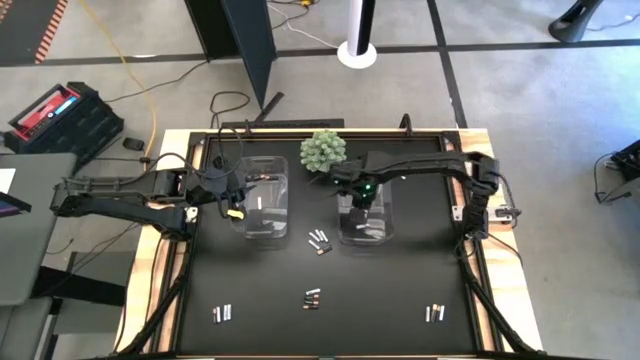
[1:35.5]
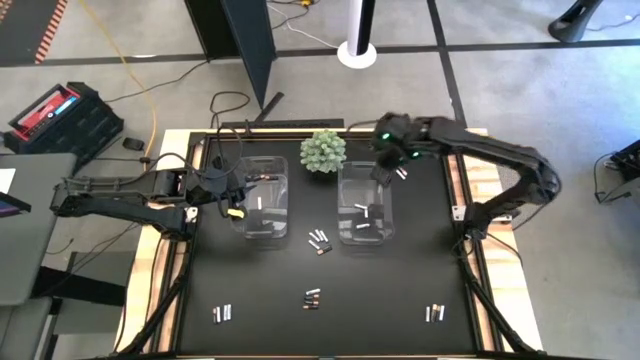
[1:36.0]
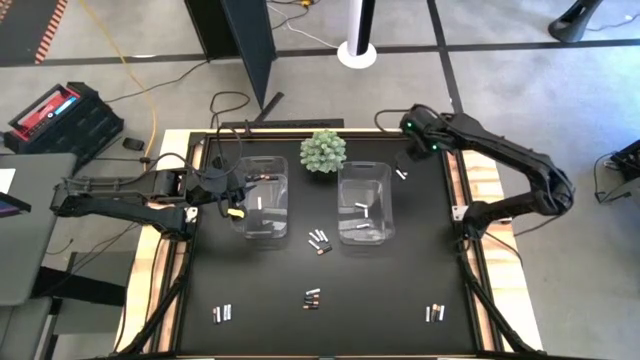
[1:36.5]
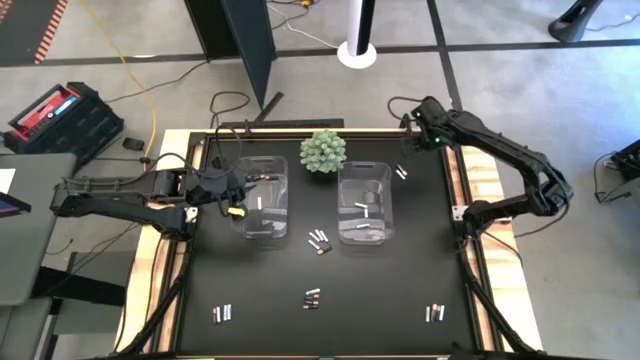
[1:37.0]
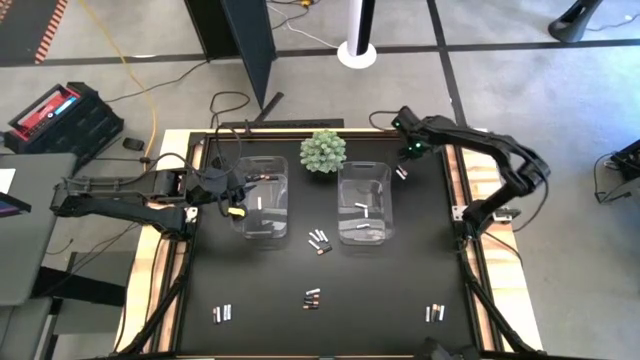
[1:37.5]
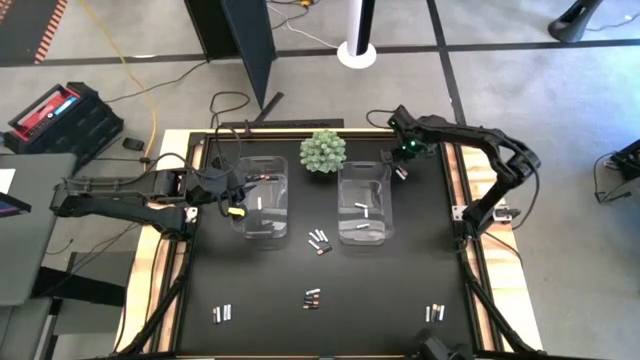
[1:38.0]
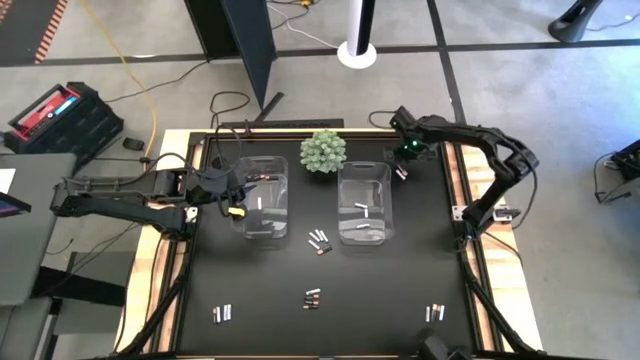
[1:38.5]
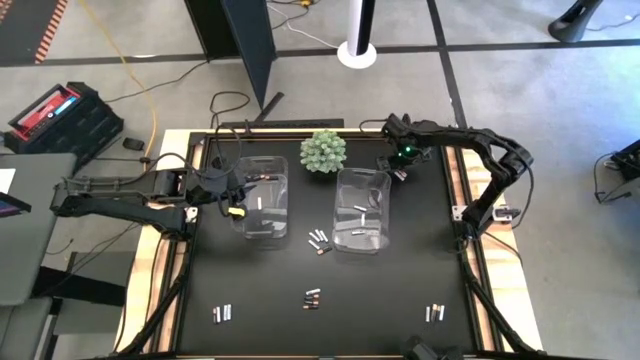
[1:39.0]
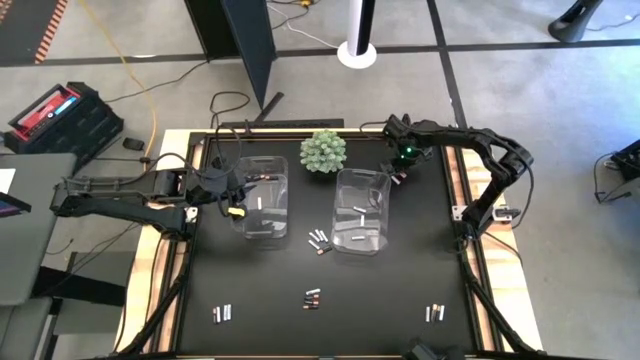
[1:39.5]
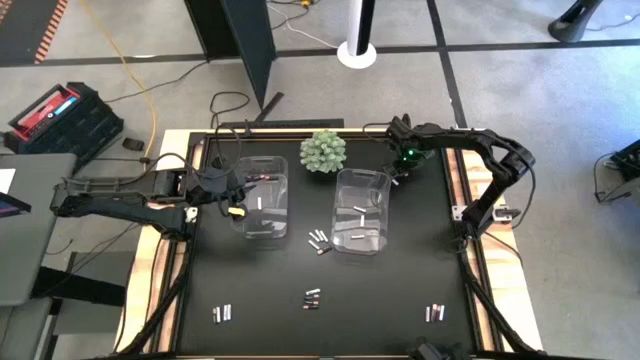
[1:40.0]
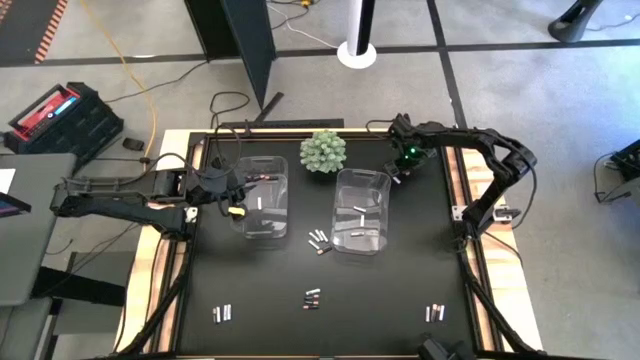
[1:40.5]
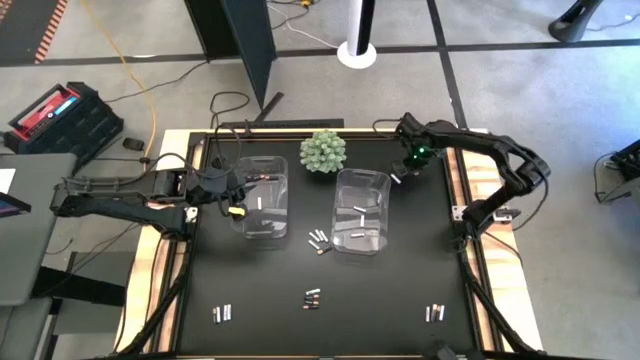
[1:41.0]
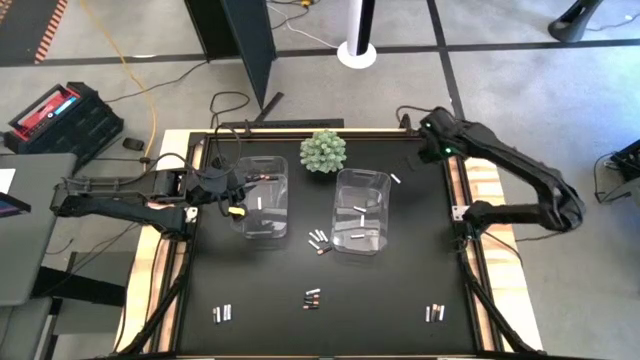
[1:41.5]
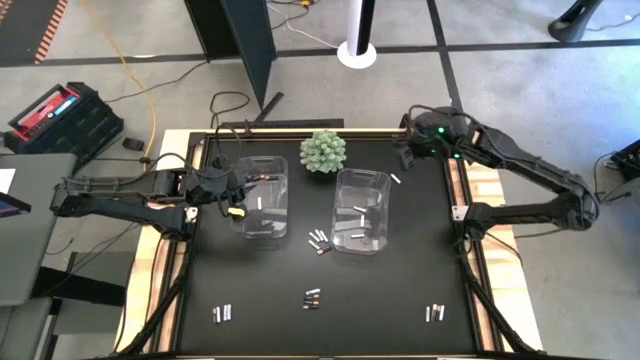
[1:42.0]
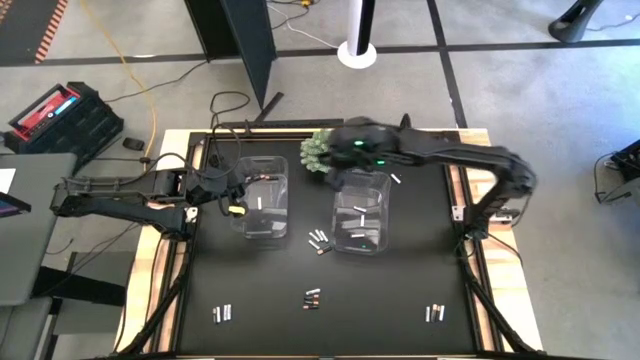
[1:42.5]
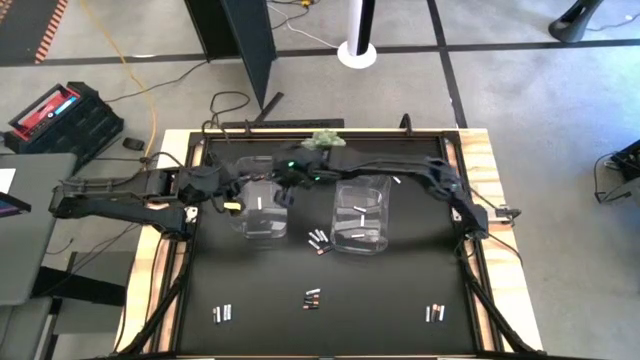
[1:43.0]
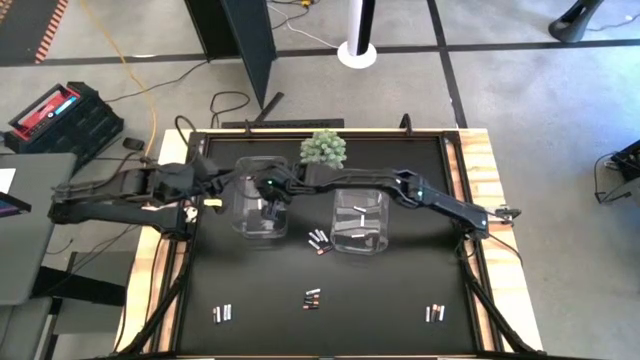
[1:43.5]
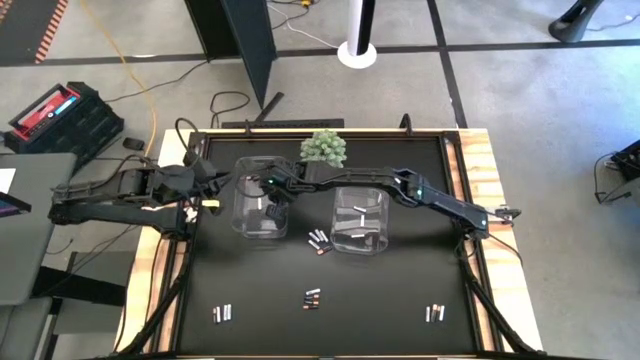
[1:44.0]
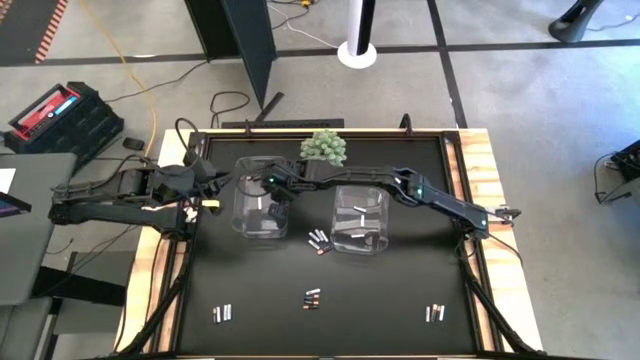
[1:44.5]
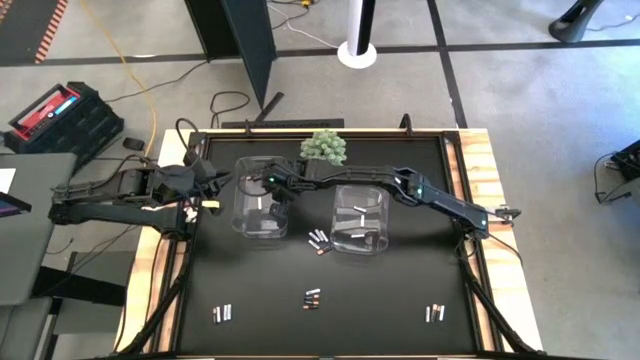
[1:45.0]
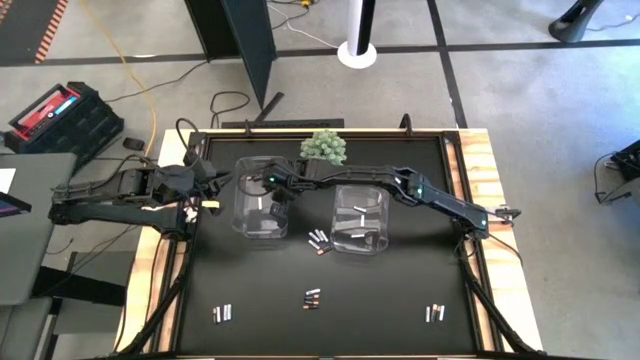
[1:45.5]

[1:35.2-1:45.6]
Task: Sort batteries
Put the black-brown battery into the left transparent bin

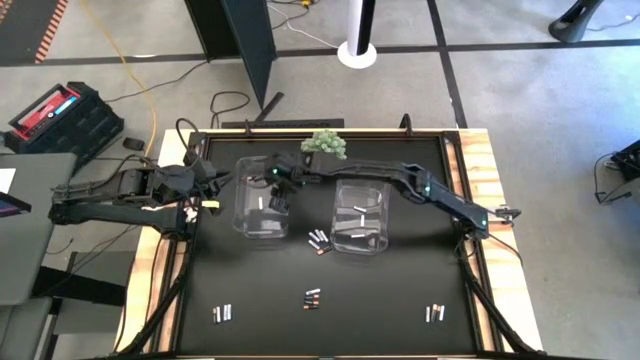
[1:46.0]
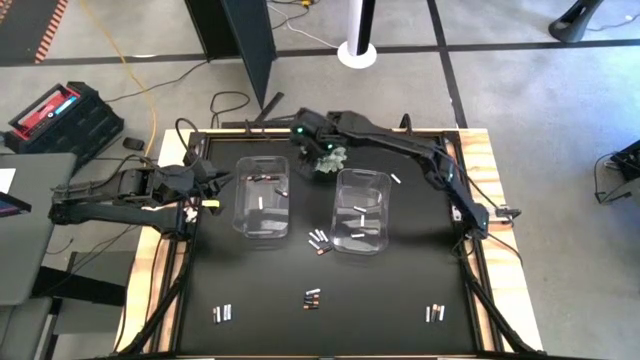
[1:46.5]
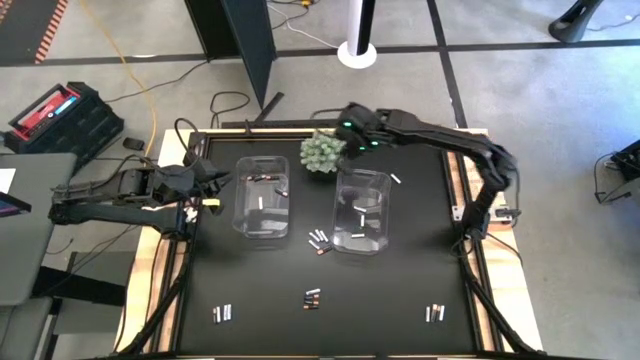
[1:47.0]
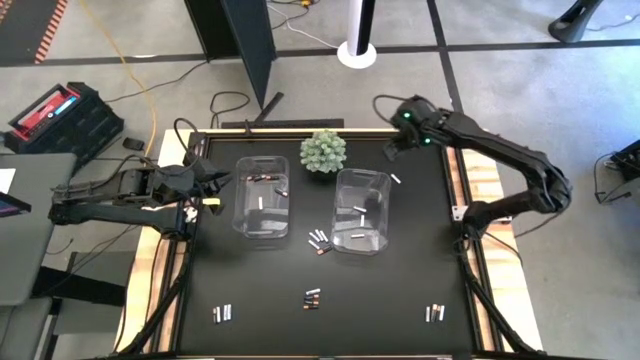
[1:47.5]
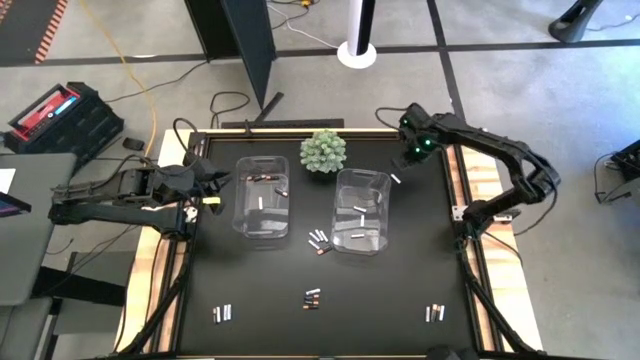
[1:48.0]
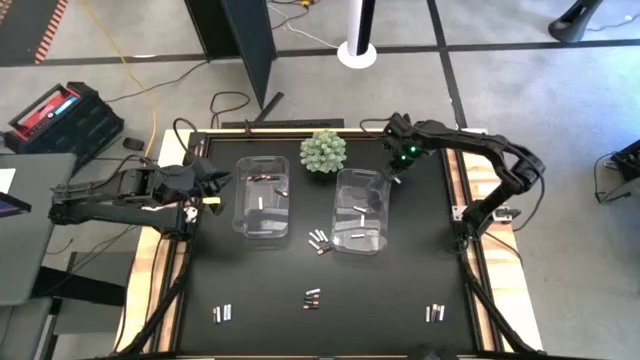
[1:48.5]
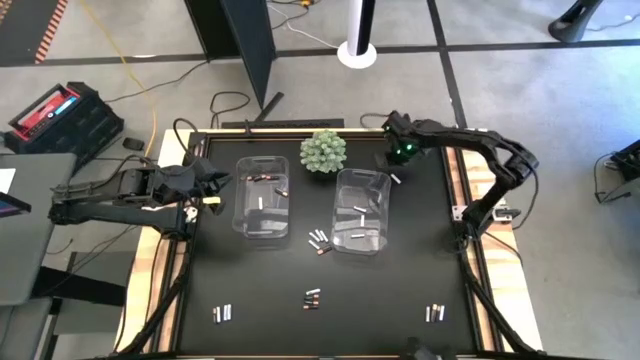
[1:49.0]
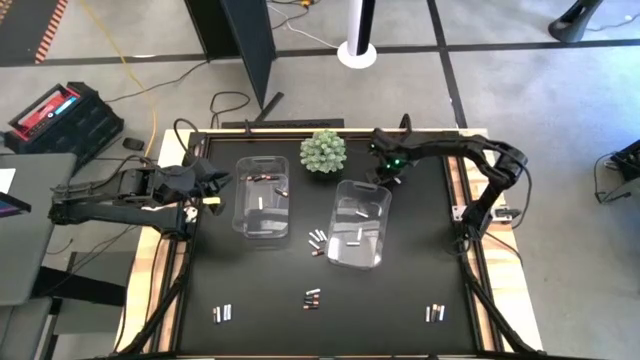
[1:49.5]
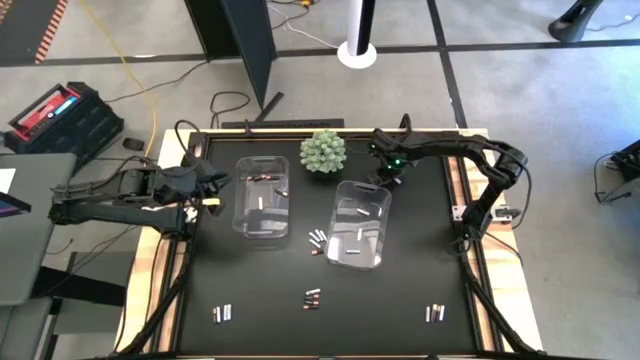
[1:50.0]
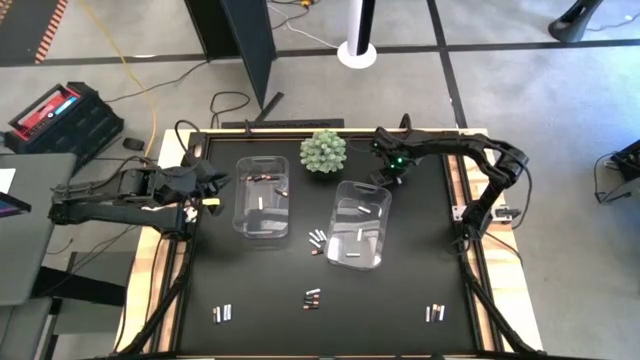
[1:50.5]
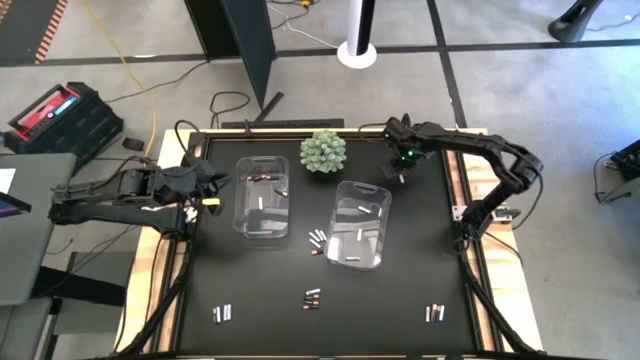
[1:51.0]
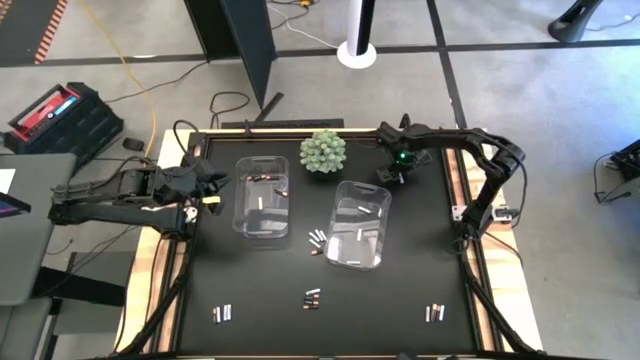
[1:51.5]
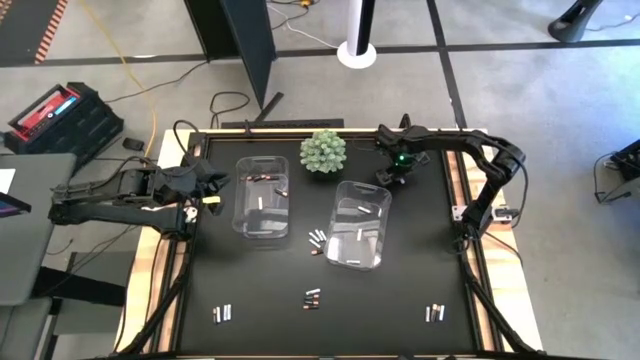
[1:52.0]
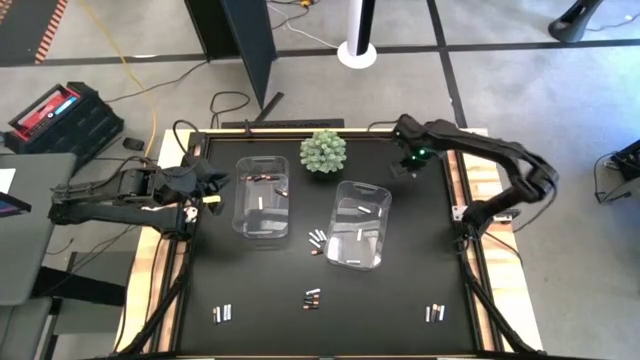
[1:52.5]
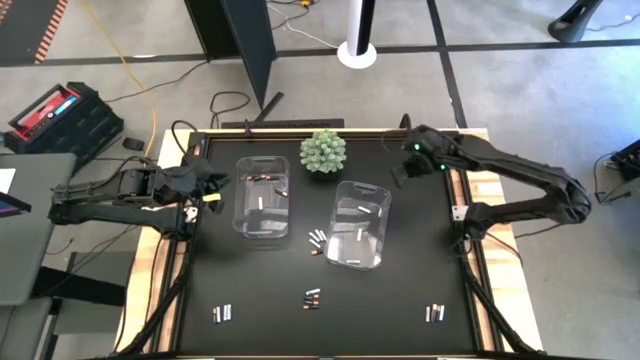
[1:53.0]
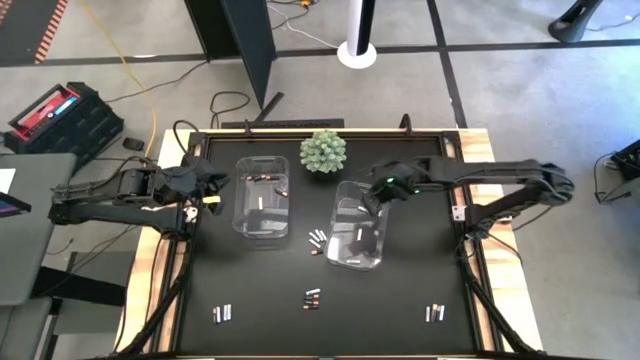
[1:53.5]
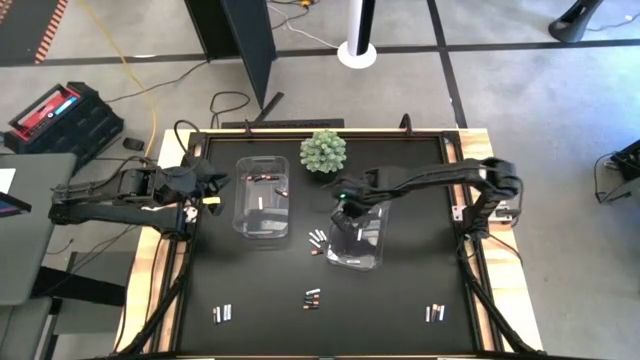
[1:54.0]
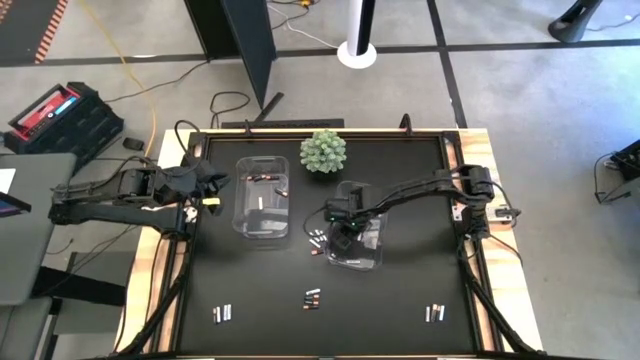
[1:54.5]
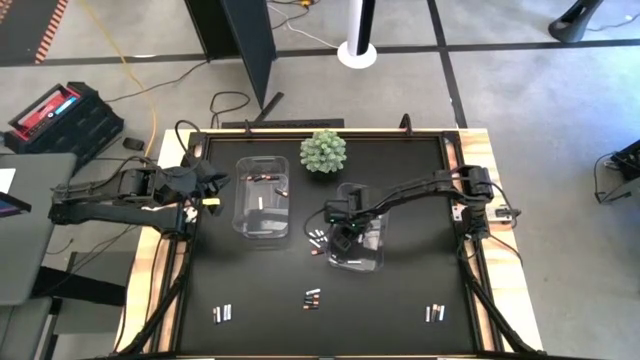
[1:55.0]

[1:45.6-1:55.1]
Put the white-blue battery into the right transparent bin

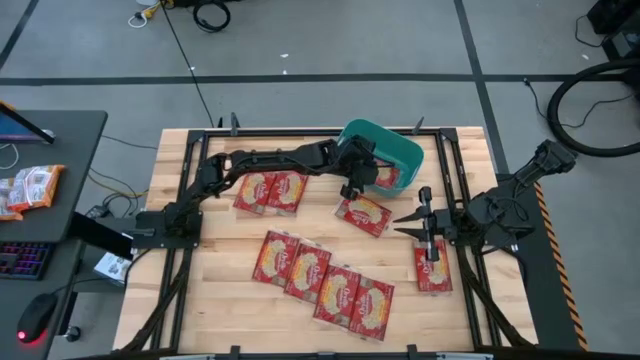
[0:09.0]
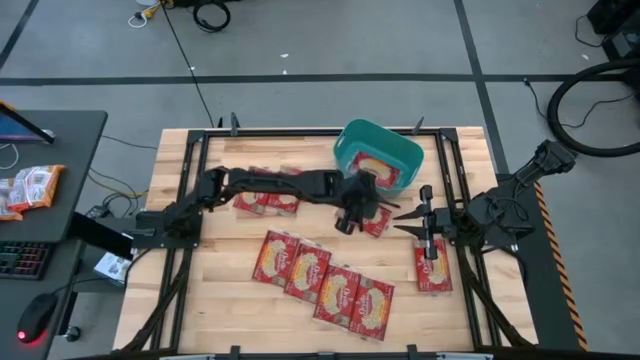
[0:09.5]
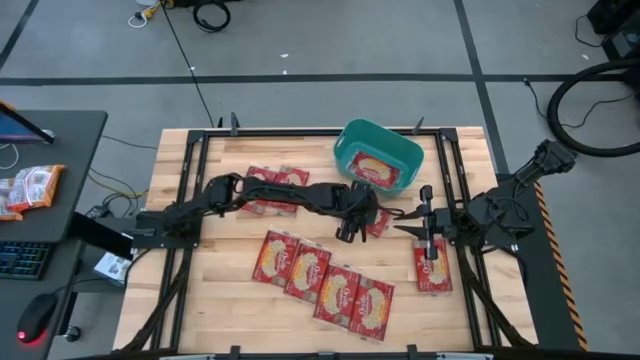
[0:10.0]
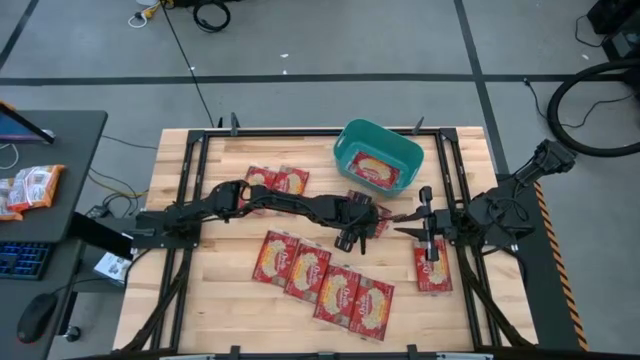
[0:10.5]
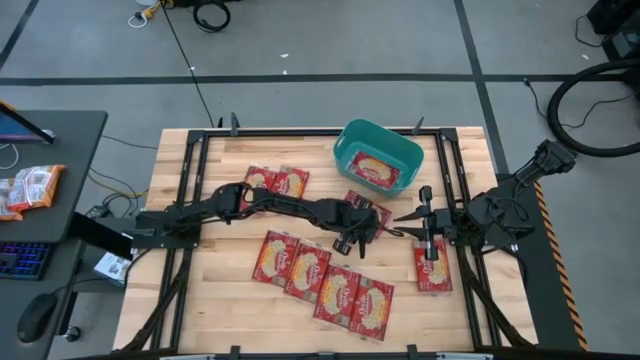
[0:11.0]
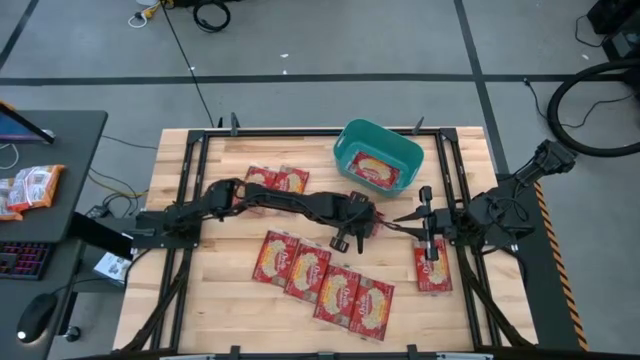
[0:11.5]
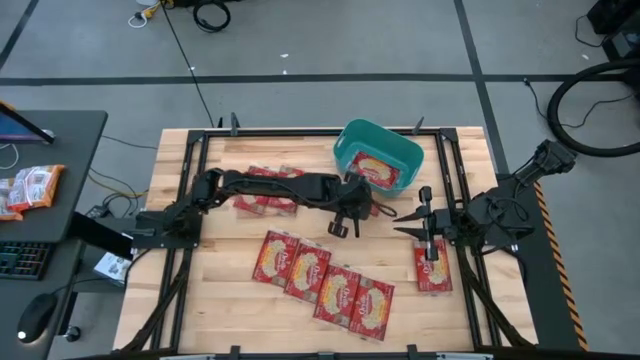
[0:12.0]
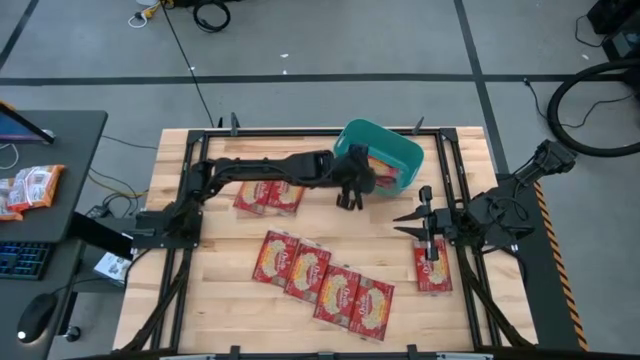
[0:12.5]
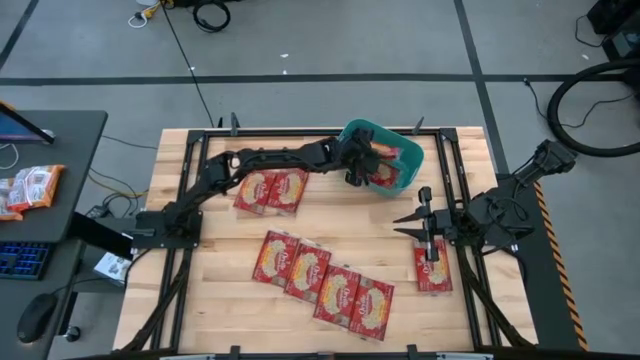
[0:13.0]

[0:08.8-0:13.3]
Task: Sort popcorn bags into baskets
Put the popcorn bag into the bin
